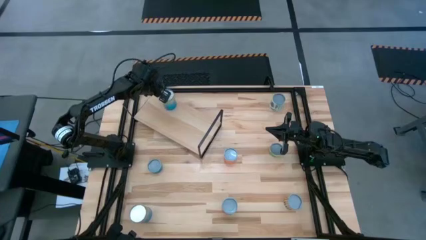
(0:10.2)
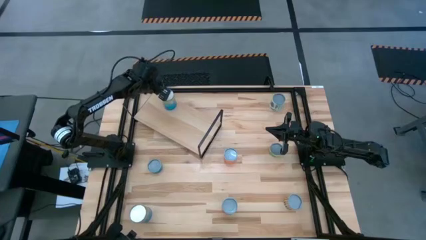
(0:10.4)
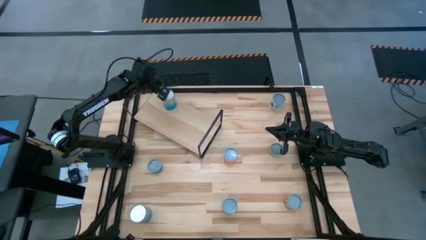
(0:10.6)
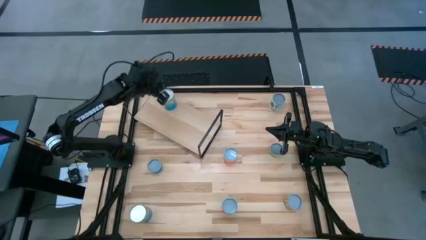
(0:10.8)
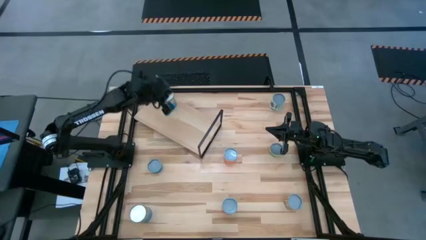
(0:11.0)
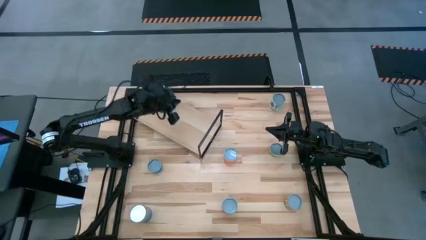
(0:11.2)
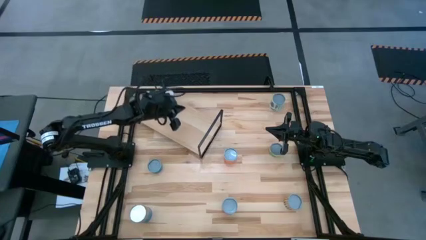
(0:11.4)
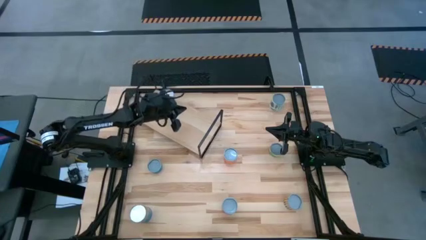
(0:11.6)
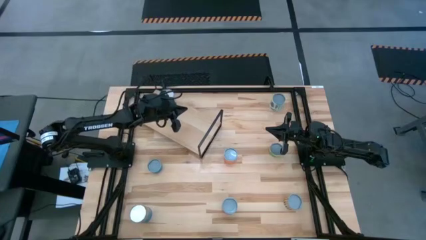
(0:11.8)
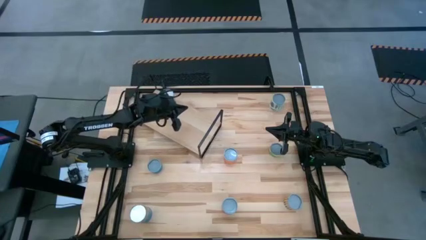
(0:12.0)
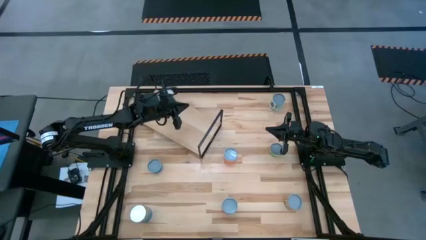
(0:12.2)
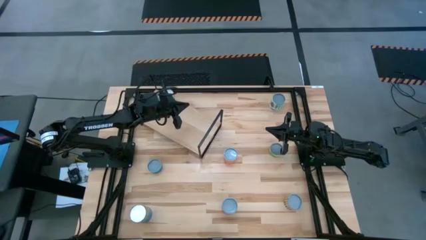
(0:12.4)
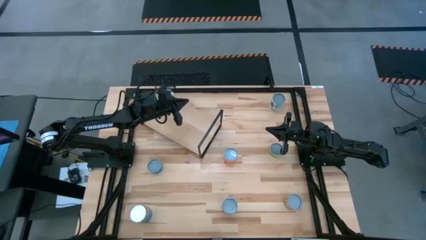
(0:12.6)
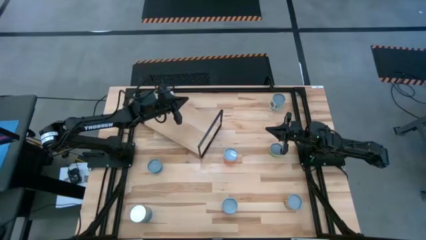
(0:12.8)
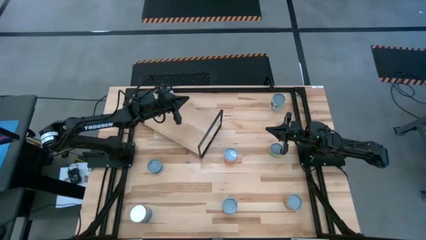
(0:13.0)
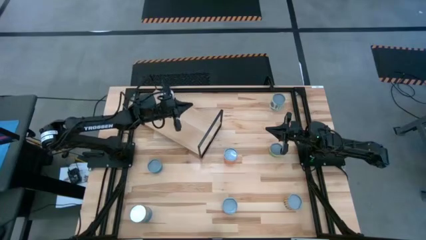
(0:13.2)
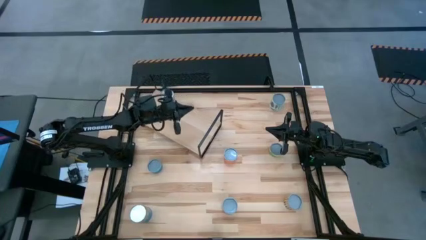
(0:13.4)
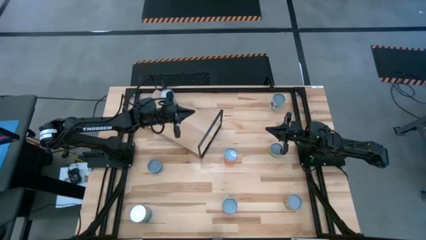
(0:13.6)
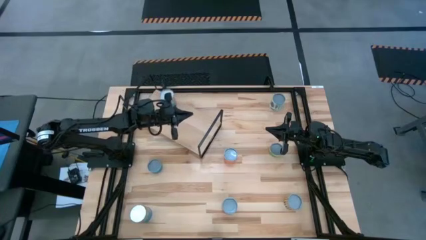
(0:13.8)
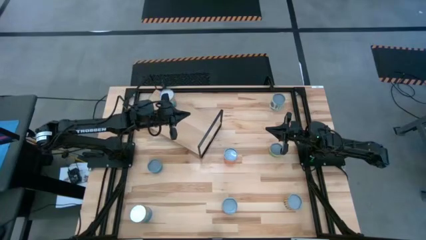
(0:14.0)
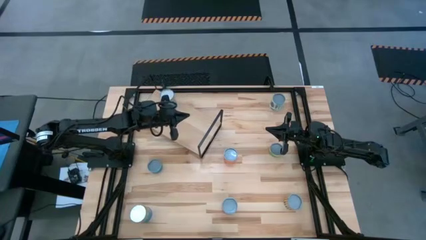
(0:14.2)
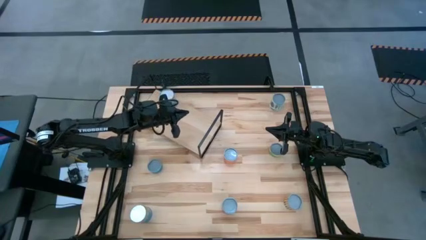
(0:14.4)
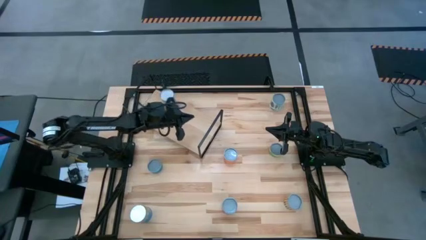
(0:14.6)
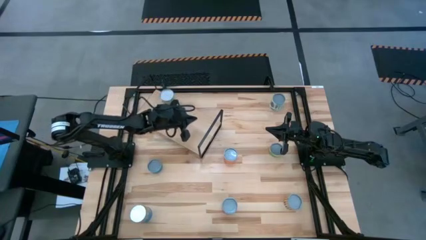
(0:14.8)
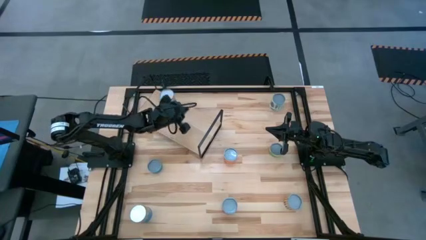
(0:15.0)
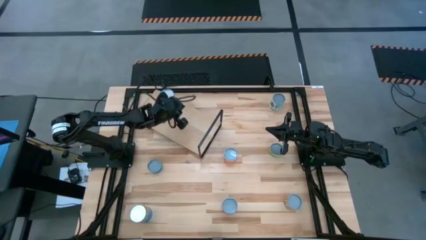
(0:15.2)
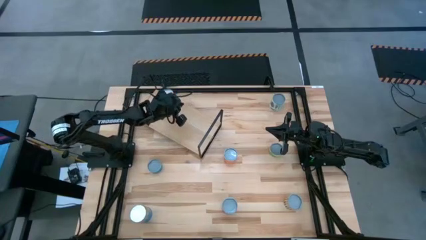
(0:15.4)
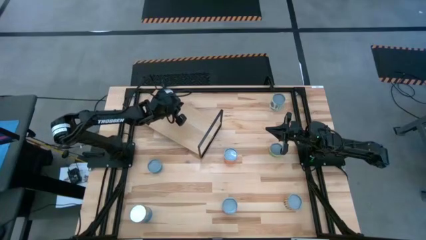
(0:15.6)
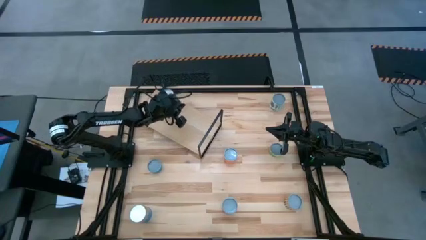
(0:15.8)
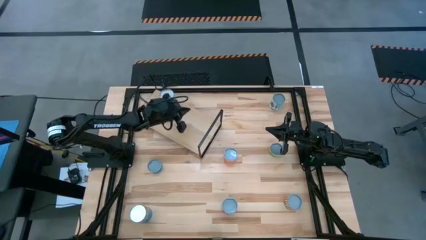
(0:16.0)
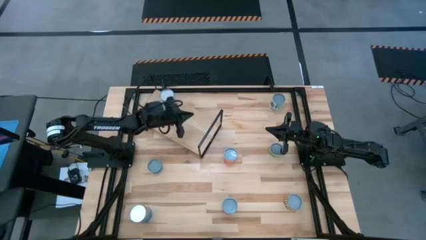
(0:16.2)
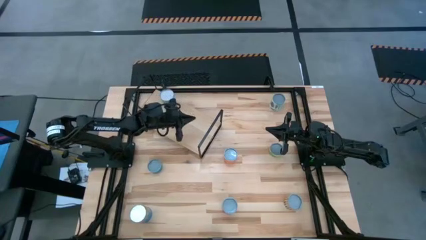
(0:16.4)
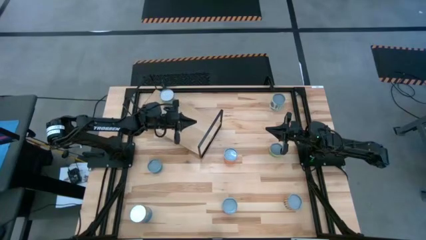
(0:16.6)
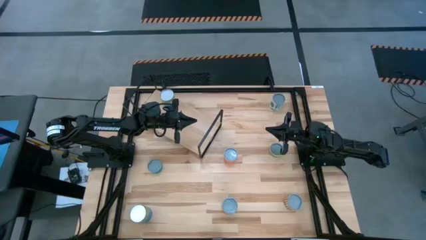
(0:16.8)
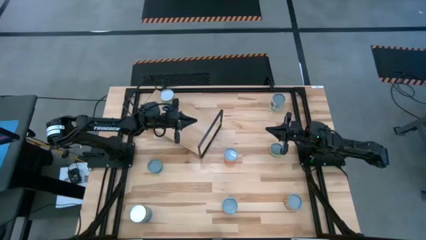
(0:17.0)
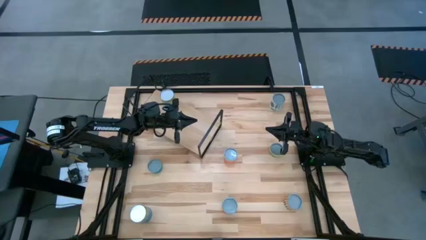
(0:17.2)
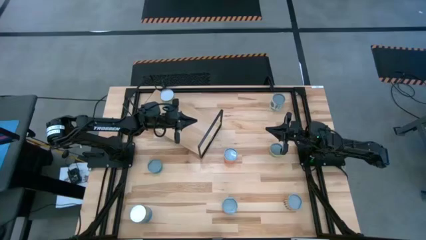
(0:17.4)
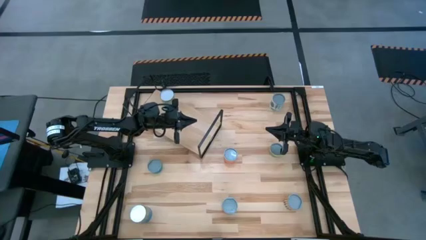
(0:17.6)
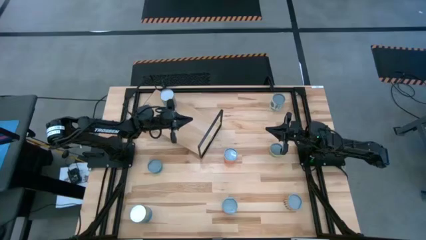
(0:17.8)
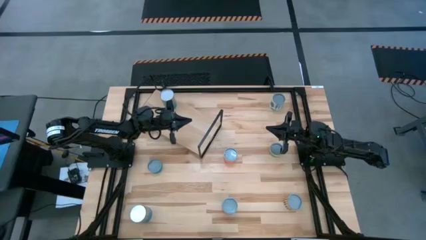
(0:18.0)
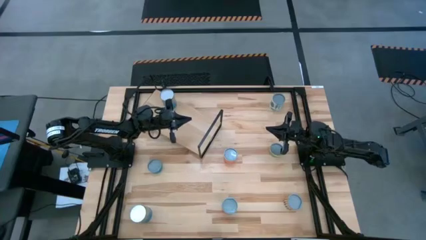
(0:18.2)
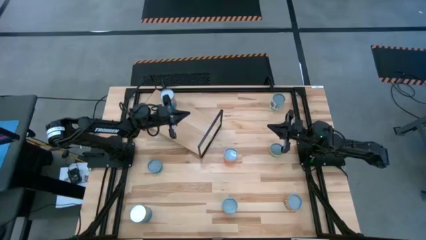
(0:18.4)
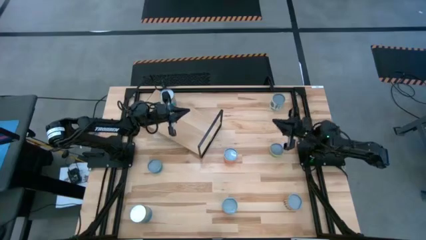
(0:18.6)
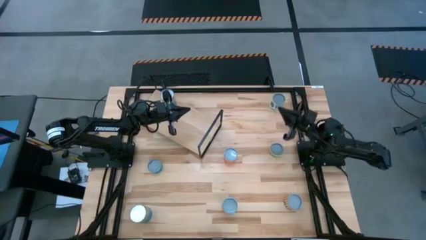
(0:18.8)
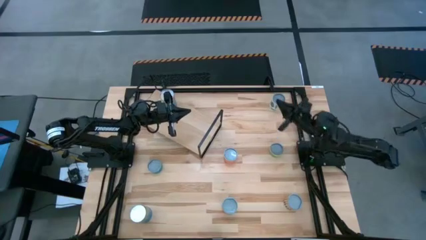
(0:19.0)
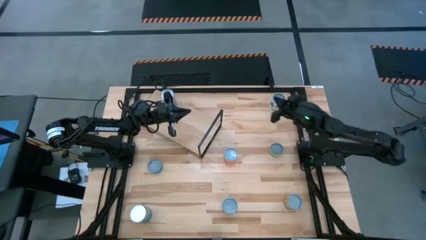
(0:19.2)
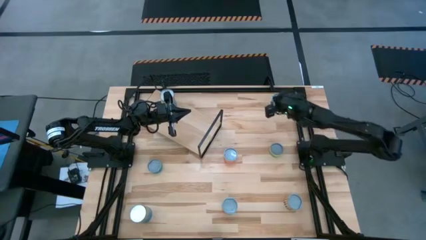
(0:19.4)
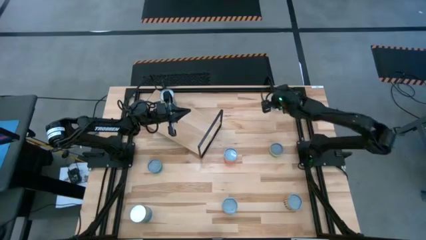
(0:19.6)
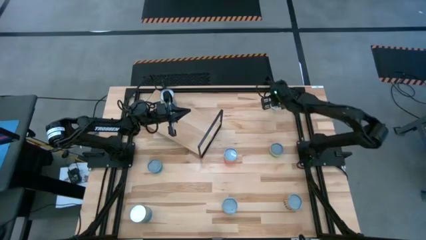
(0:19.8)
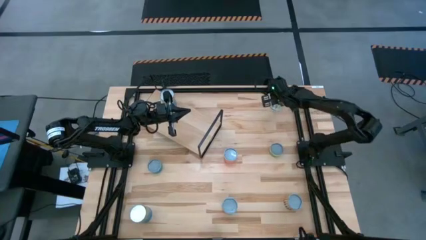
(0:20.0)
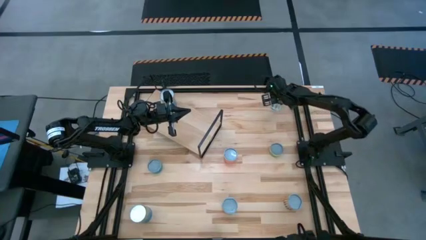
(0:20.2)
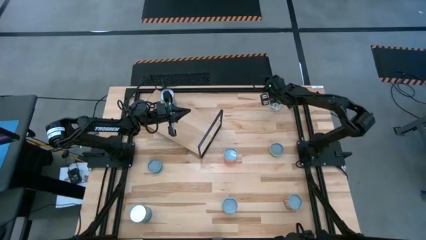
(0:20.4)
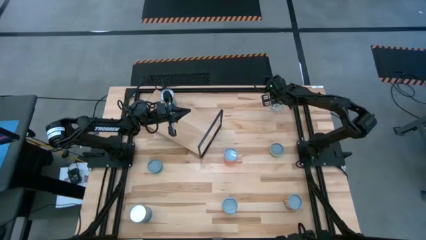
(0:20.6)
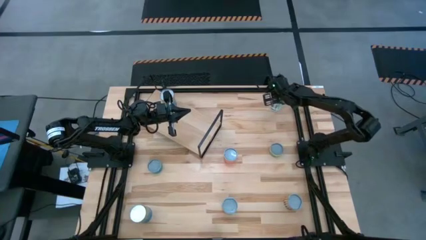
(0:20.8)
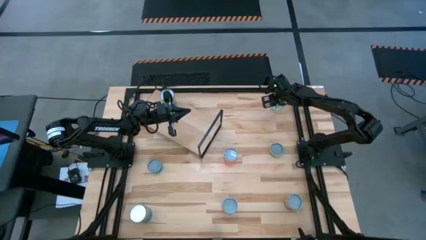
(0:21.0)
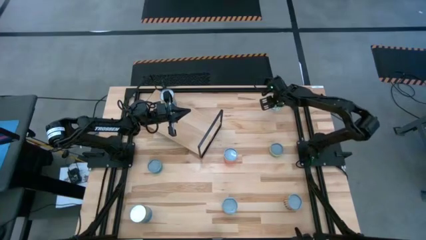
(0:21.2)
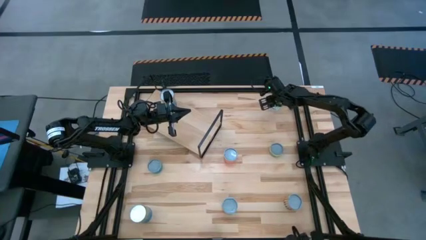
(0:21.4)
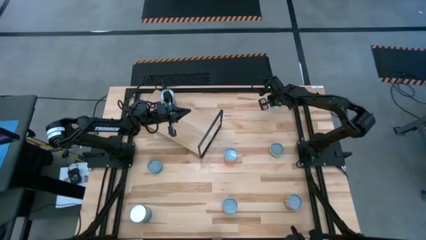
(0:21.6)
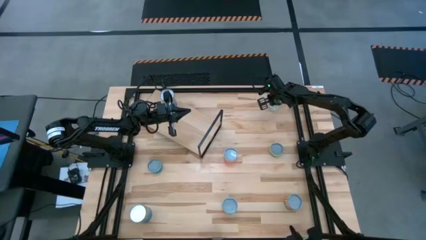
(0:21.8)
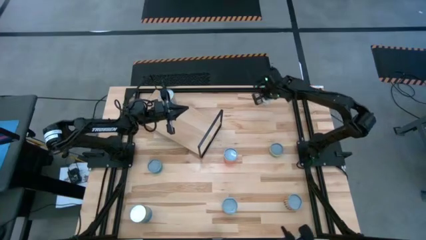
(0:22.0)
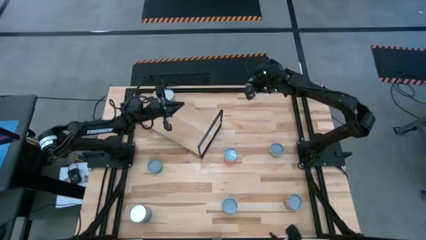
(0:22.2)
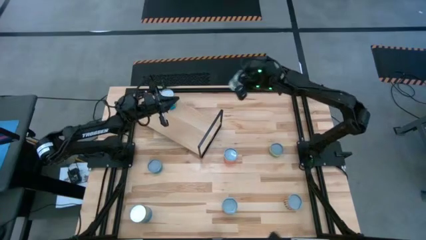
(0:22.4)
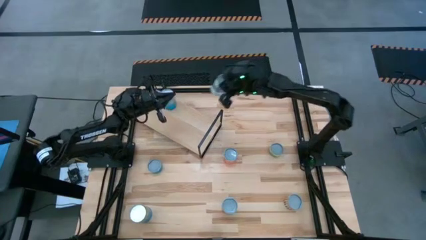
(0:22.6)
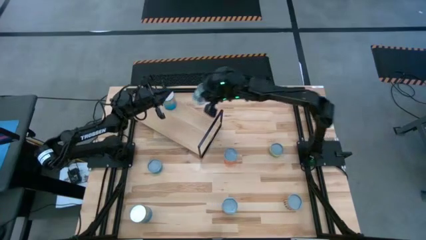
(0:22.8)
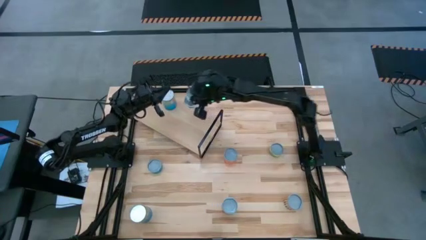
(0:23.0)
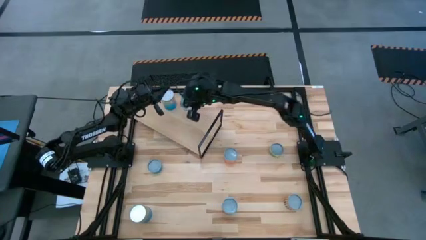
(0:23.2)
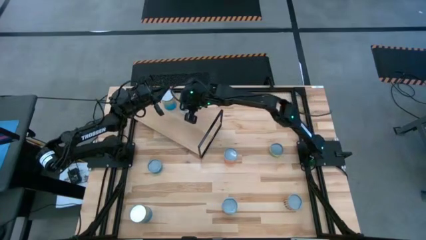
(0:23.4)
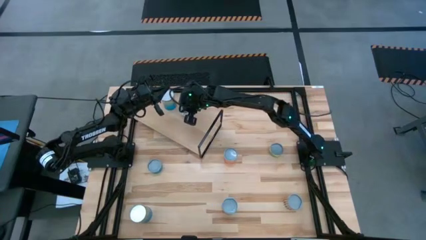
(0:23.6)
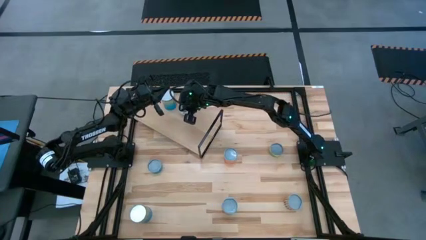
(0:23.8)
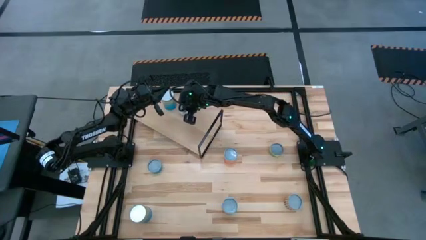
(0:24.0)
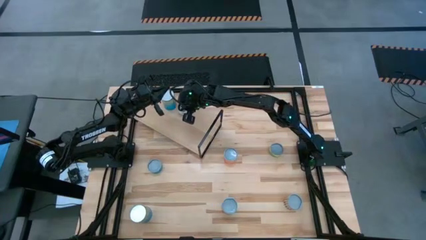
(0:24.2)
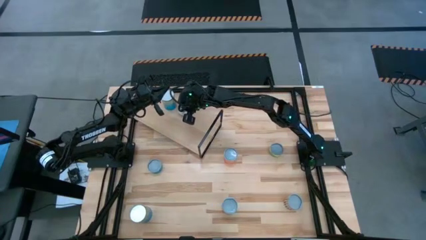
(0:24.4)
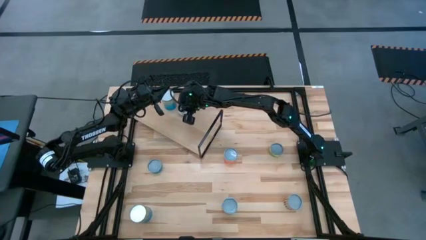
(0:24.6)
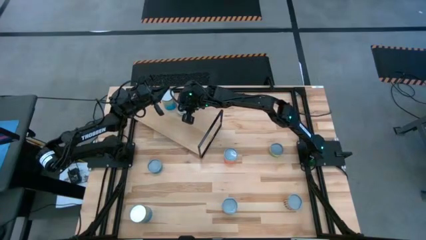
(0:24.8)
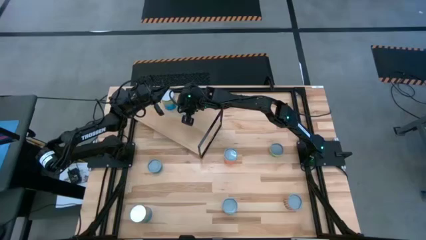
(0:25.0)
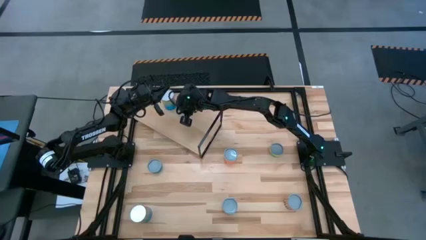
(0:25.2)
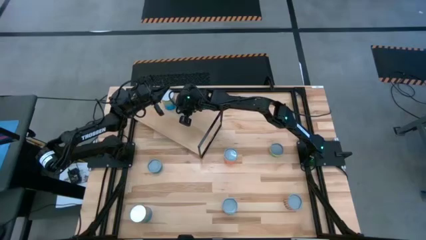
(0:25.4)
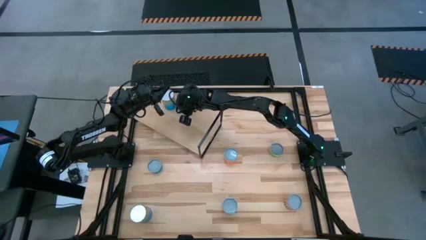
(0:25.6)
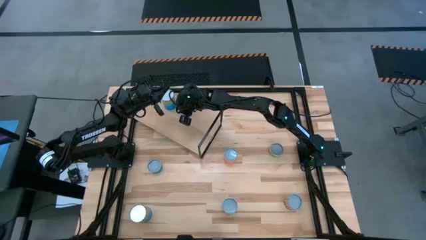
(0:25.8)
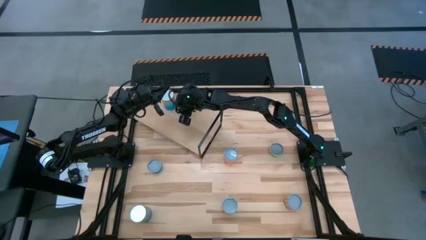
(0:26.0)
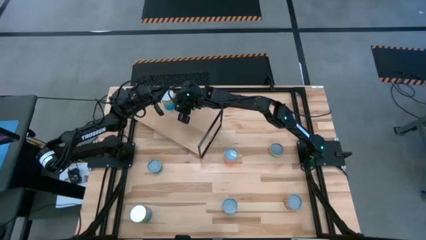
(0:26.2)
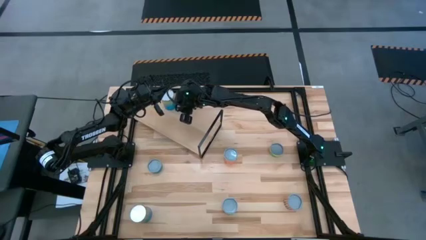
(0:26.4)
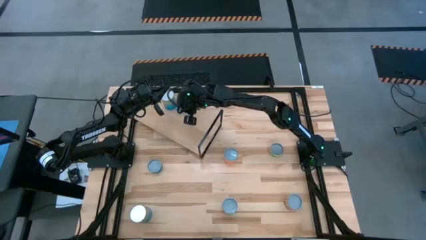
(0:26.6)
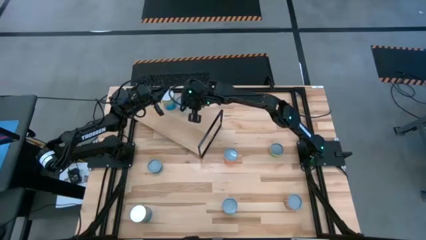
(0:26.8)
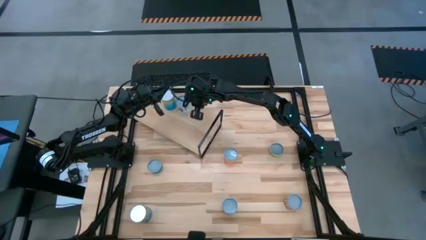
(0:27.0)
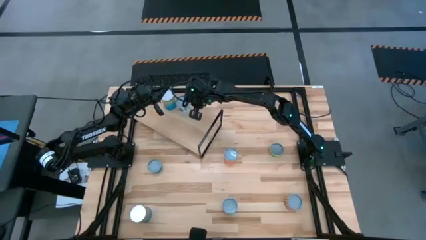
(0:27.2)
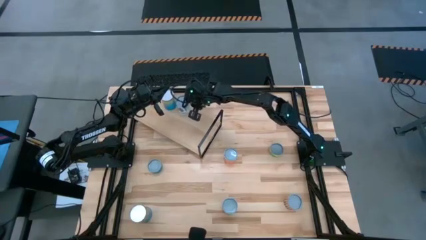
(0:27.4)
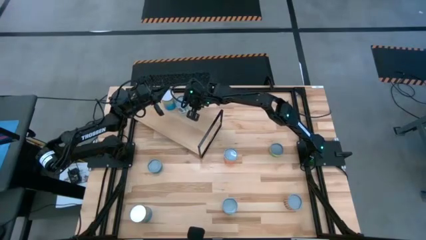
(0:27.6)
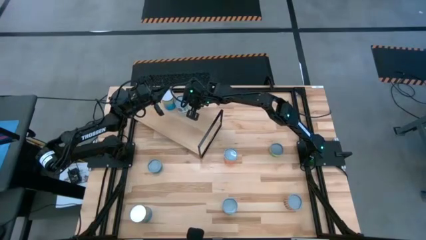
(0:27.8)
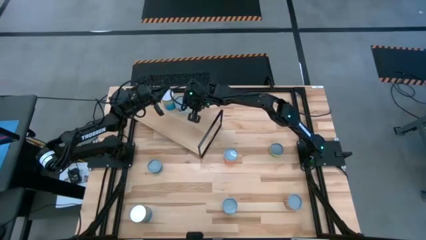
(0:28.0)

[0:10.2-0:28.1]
Task: Pick and place cans onto a shelf
Put the canned carrots on the shelf
